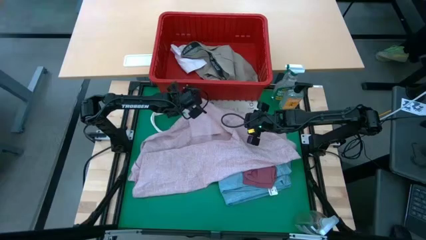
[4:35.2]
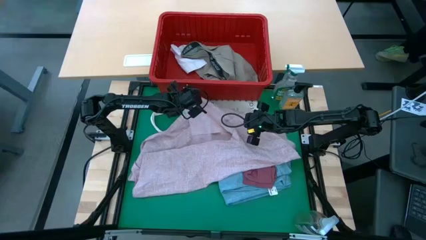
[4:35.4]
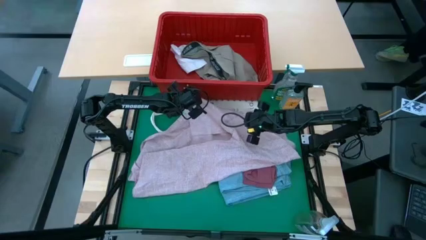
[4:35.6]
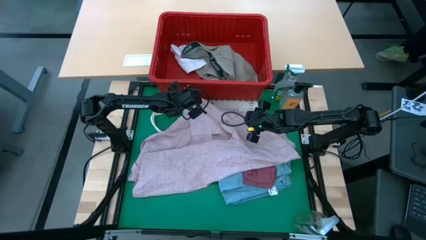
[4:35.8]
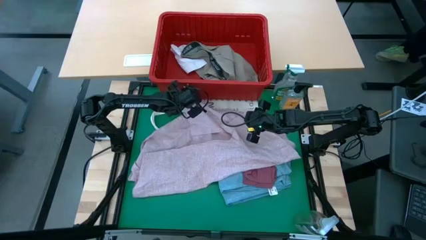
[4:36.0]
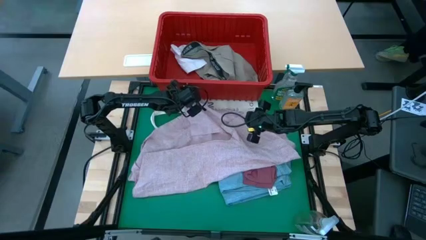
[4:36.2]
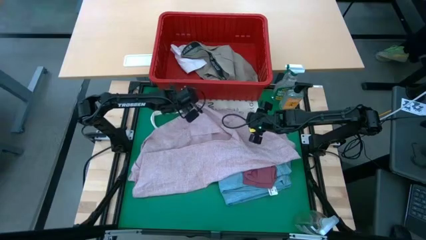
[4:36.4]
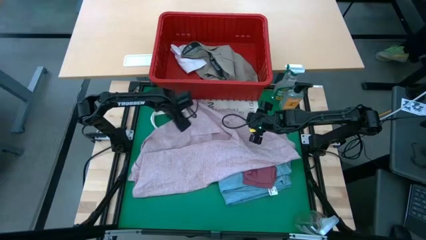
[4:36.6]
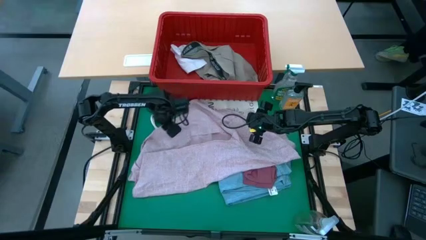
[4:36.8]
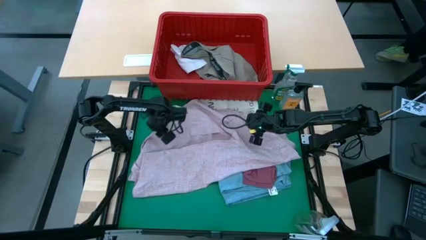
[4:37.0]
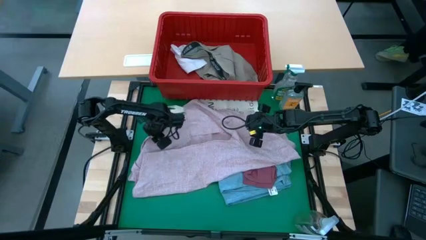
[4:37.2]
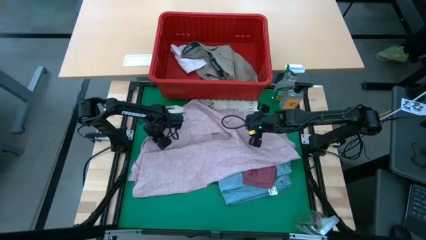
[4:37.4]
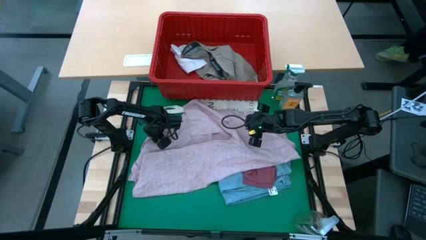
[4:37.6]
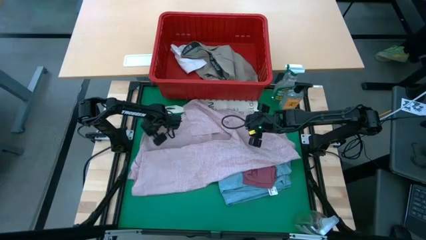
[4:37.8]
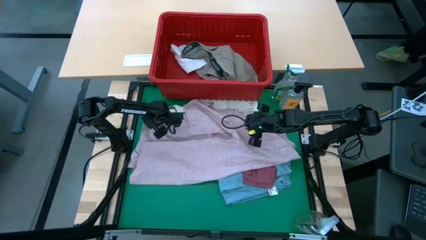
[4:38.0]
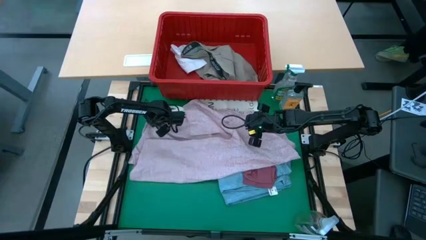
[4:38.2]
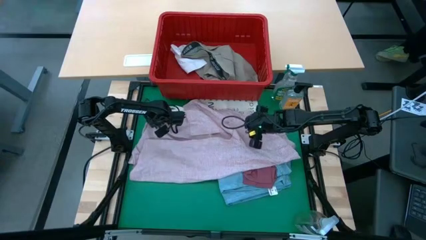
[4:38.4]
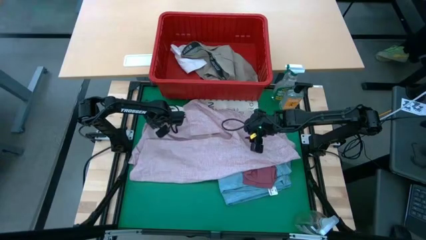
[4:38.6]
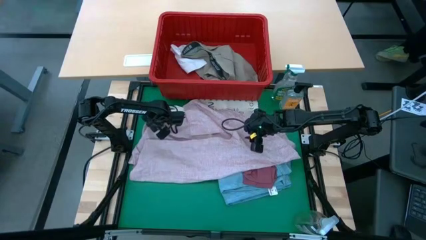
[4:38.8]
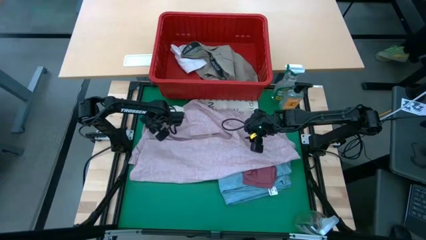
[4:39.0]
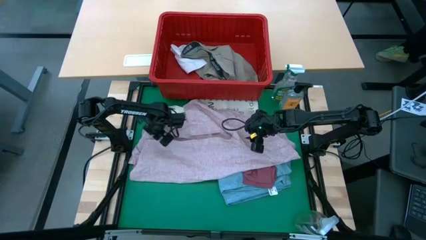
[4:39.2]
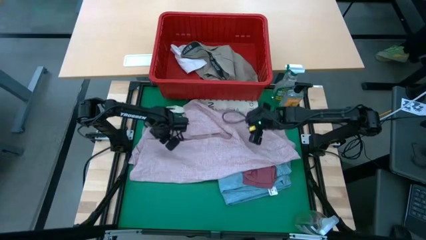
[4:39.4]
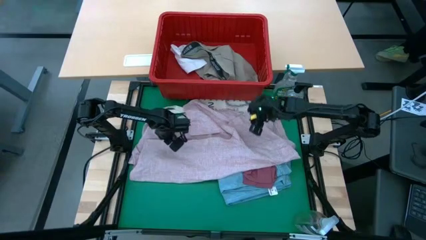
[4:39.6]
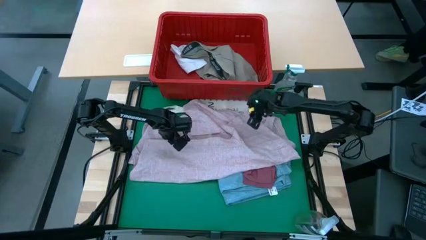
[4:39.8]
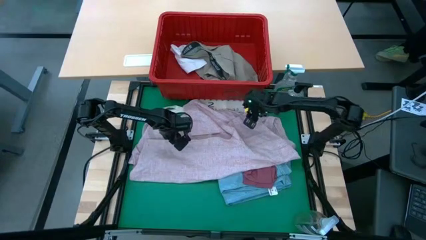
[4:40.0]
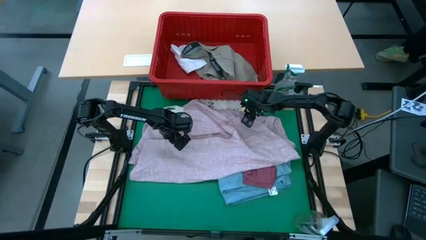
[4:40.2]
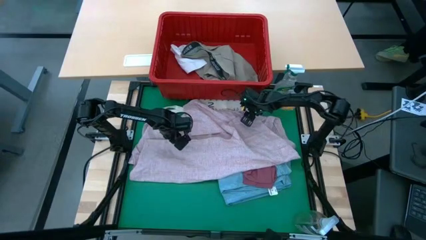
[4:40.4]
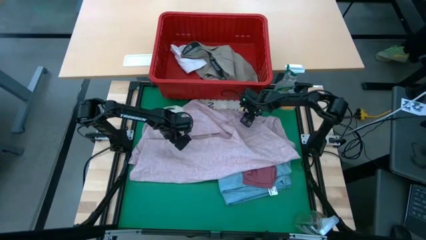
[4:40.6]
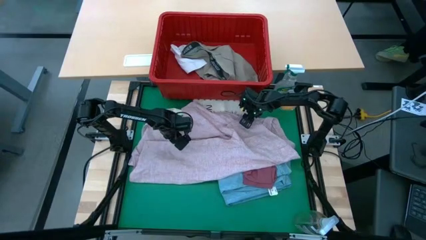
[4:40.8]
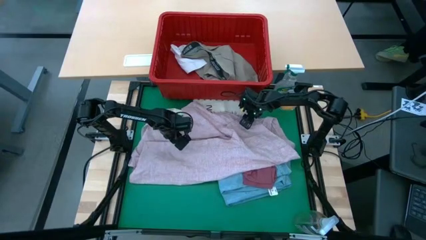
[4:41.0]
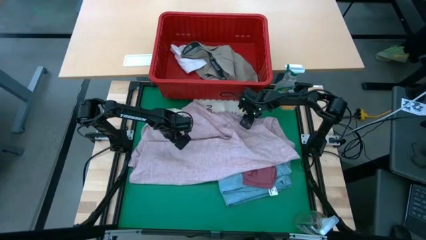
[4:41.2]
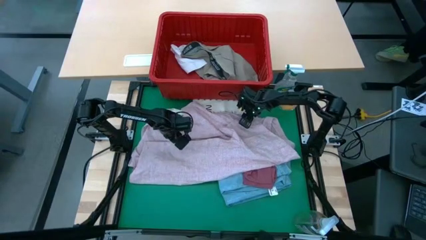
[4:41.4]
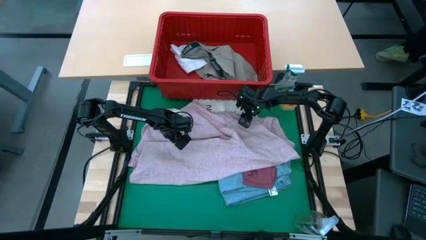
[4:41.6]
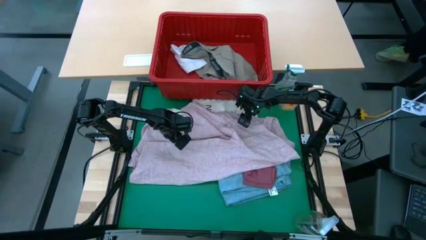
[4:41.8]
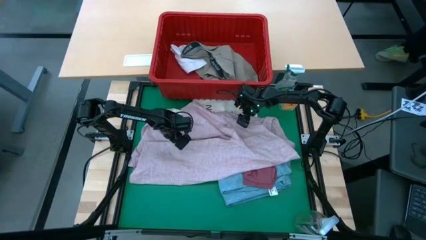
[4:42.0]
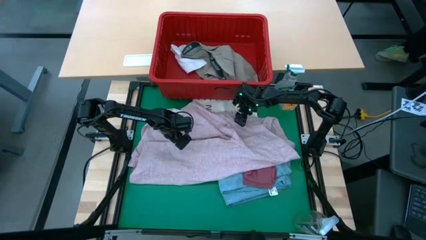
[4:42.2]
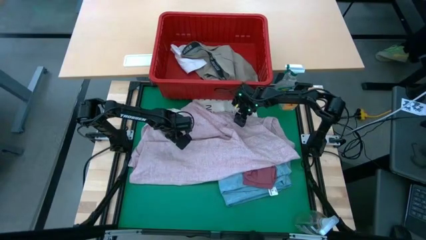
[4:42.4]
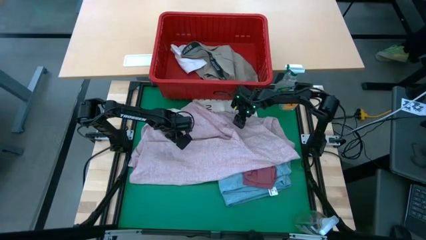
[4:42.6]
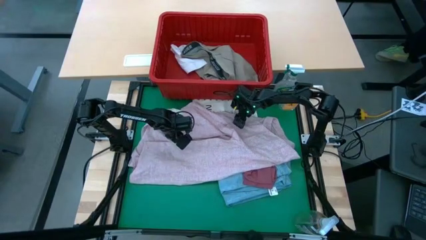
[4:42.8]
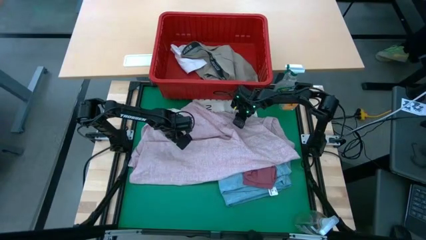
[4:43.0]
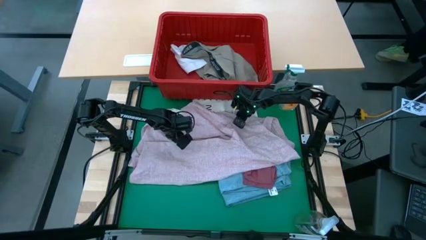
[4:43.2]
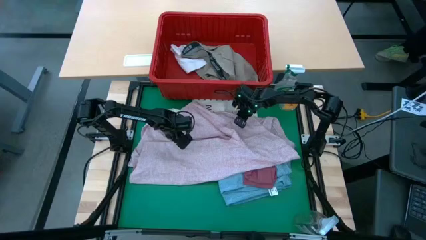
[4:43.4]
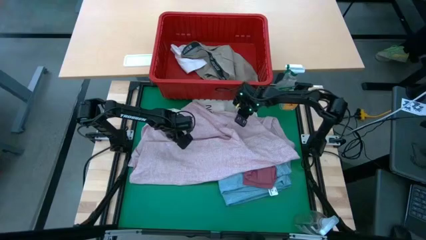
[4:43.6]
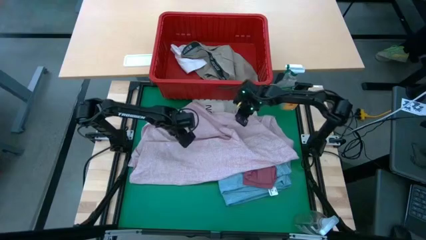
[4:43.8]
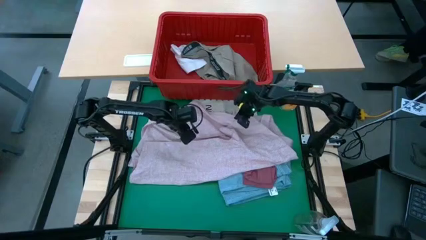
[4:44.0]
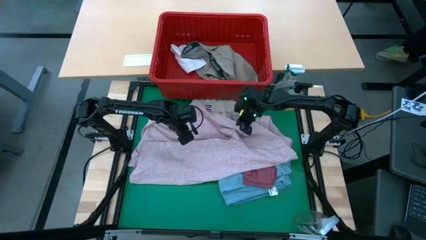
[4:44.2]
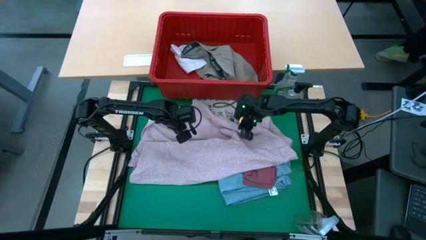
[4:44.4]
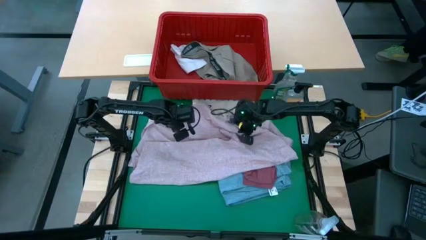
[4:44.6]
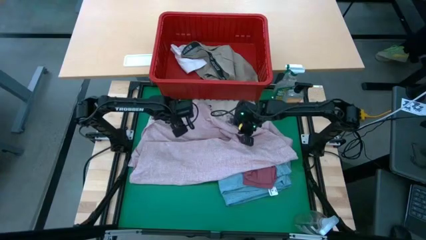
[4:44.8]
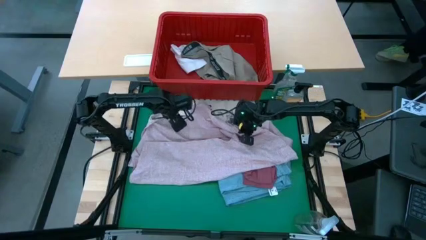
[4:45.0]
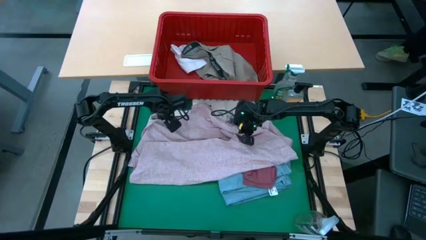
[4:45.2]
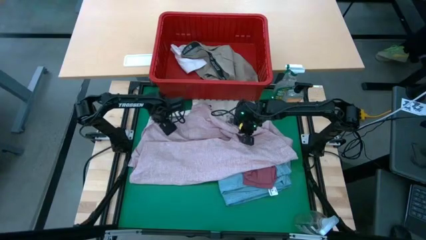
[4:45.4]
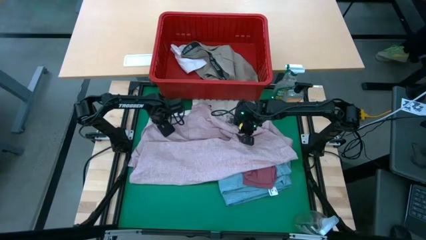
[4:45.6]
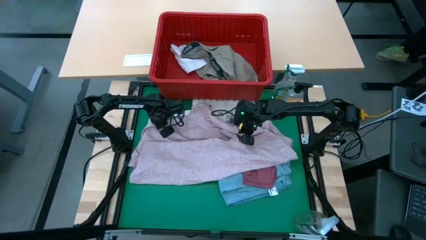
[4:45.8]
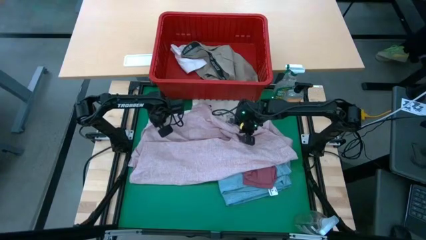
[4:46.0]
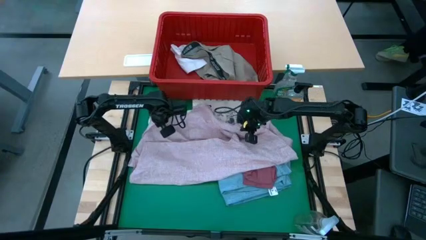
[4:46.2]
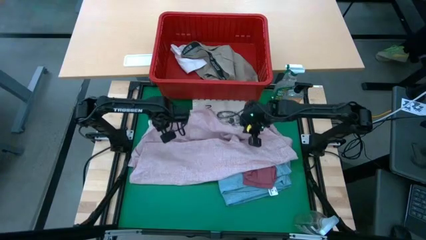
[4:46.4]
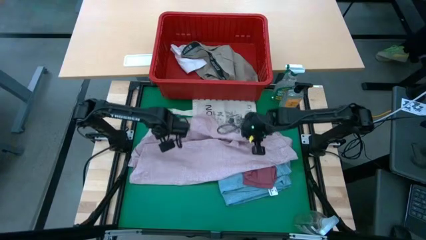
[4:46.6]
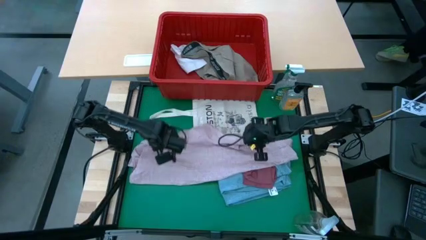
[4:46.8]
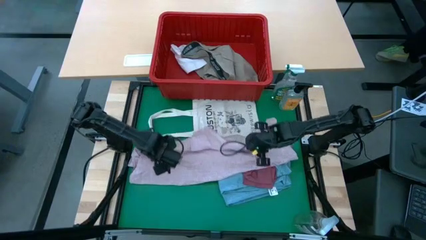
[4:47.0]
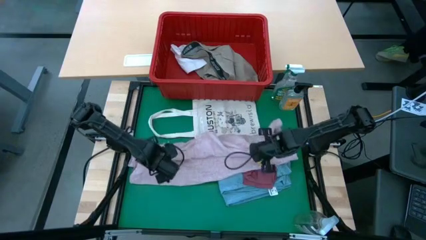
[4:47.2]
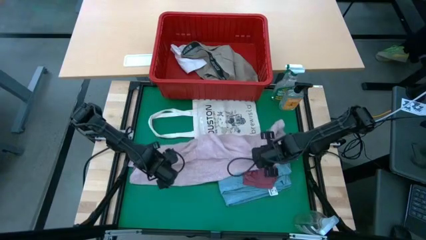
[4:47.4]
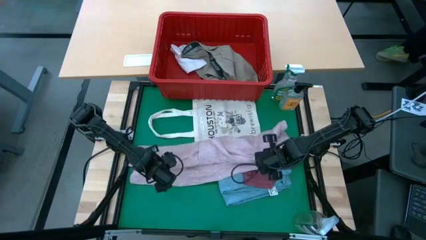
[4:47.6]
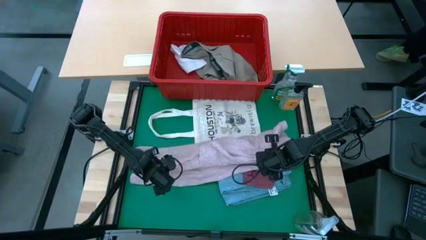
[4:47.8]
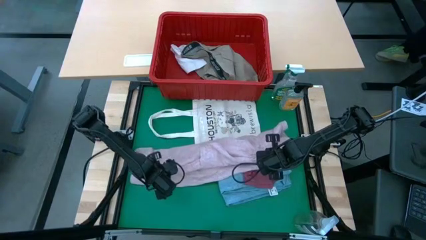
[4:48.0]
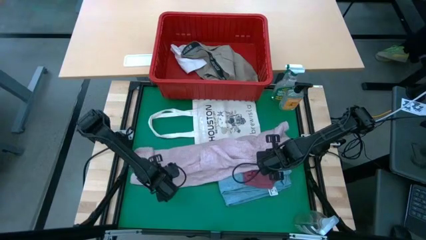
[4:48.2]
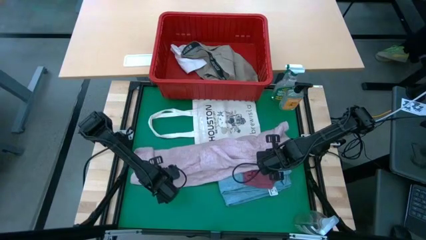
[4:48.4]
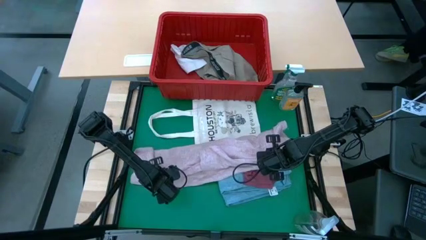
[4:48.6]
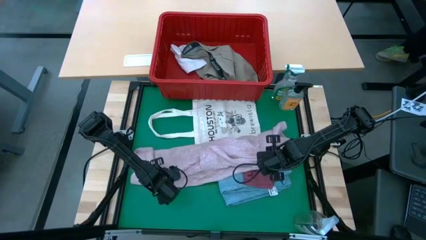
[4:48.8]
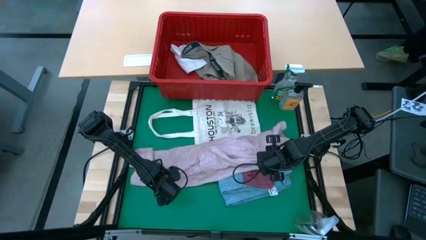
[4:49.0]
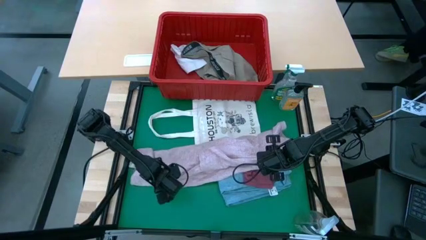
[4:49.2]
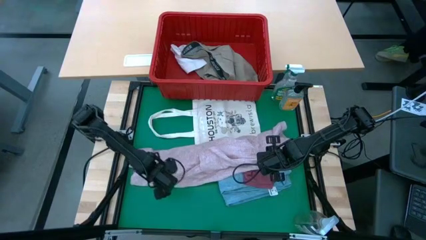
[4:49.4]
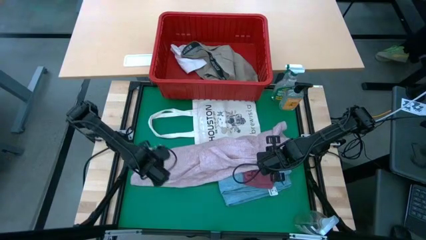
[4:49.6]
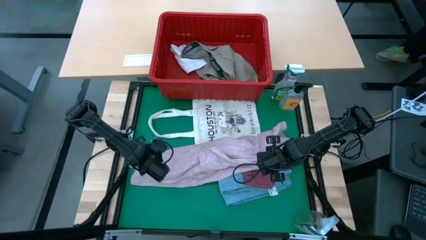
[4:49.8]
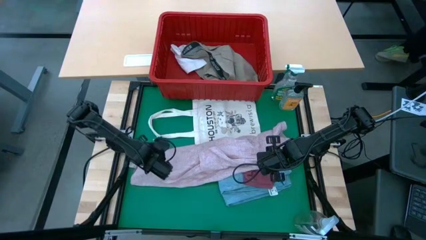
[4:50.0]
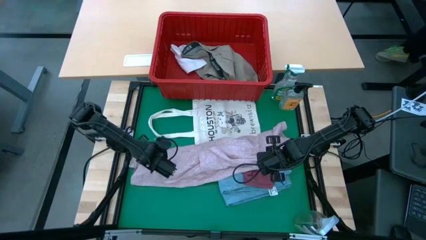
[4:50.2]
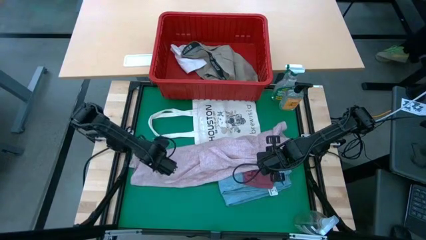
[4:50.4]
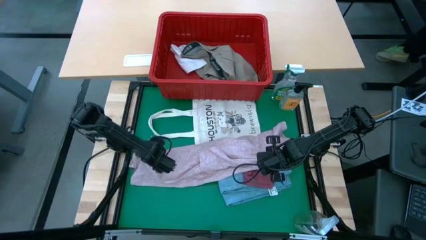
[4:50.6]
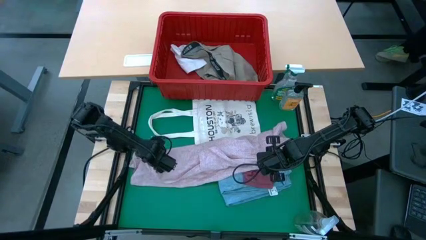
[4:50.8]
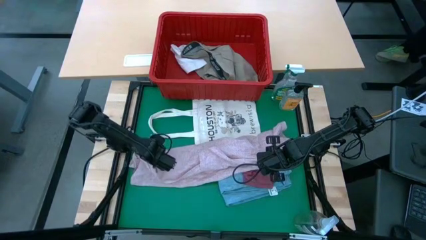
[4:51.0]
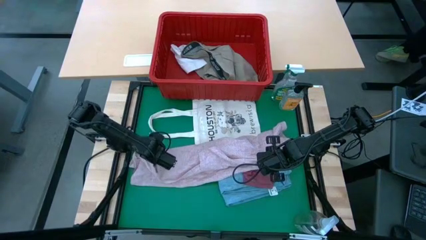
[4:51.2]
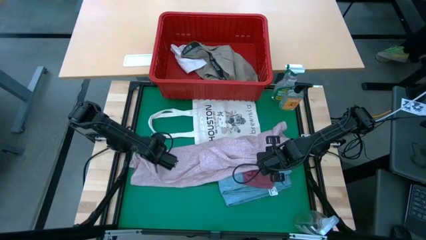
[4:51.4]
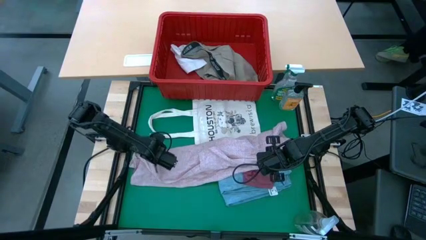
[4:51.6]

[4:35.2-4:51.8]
Task: Fold Laundry from Bin
Fold the pink shirt from the red laundry basket
